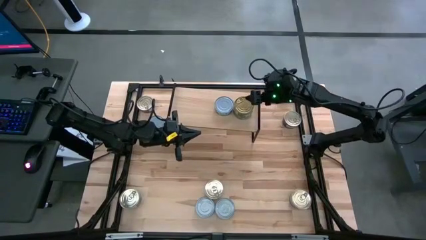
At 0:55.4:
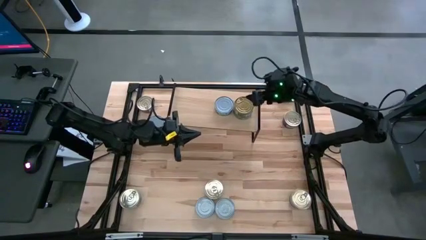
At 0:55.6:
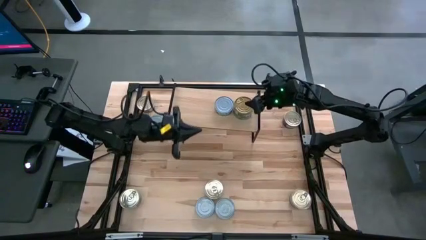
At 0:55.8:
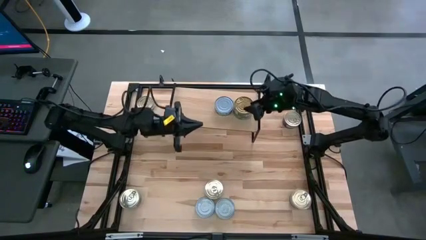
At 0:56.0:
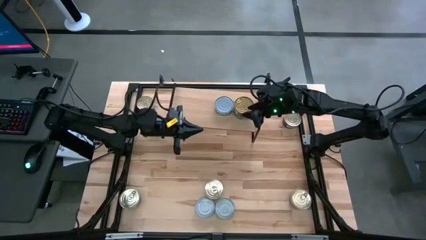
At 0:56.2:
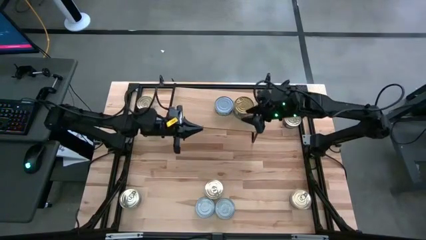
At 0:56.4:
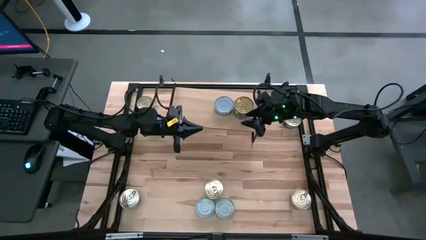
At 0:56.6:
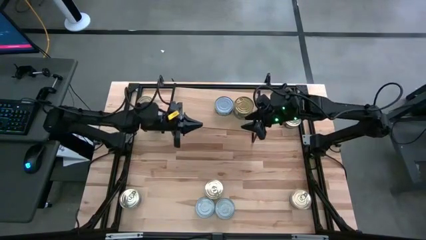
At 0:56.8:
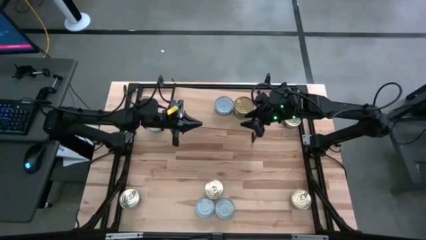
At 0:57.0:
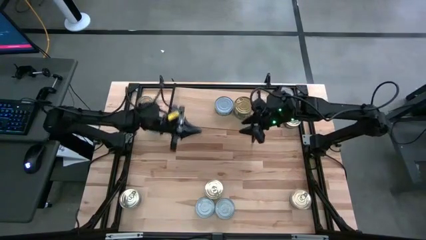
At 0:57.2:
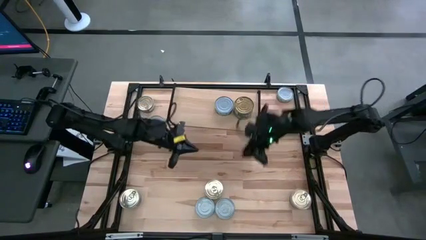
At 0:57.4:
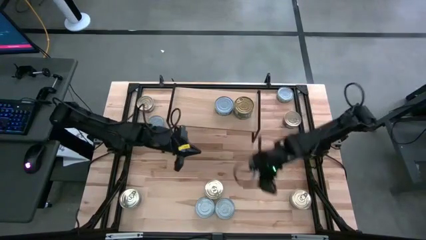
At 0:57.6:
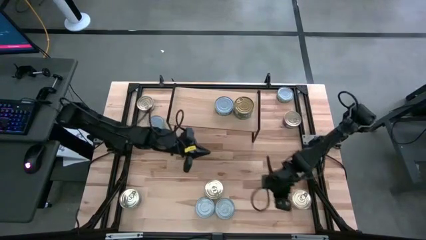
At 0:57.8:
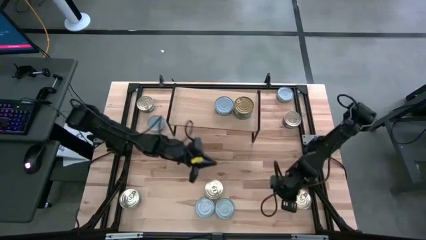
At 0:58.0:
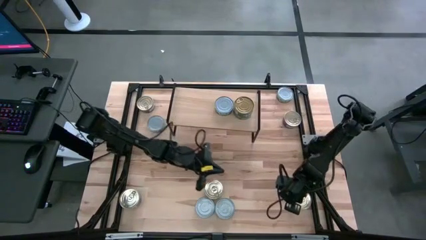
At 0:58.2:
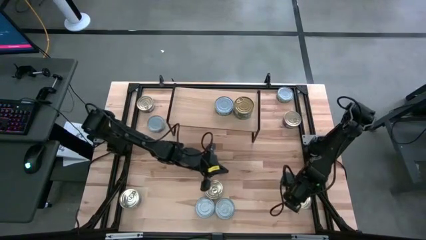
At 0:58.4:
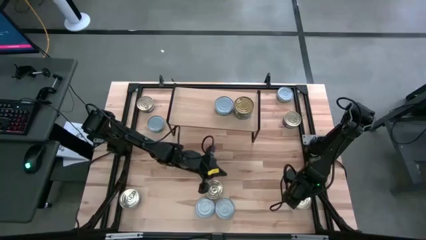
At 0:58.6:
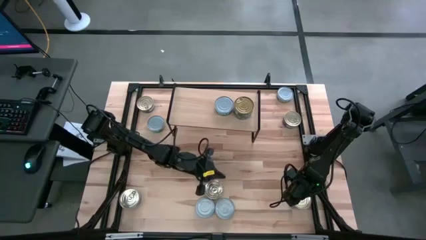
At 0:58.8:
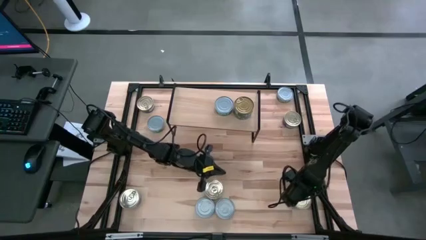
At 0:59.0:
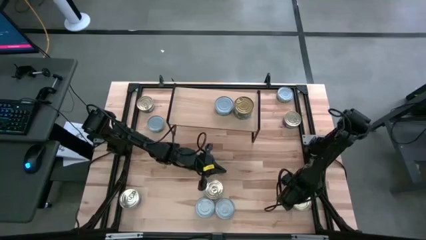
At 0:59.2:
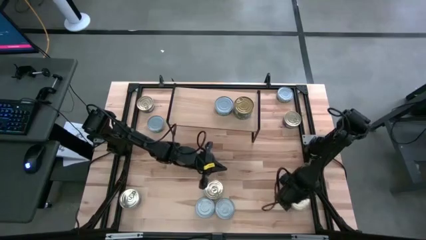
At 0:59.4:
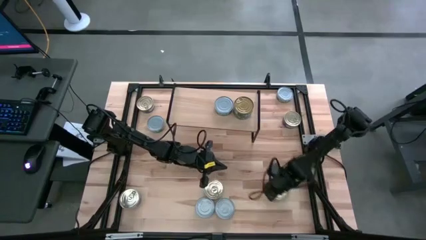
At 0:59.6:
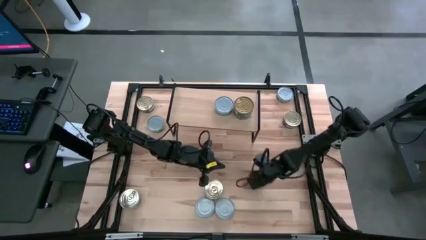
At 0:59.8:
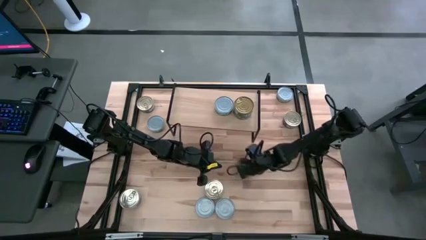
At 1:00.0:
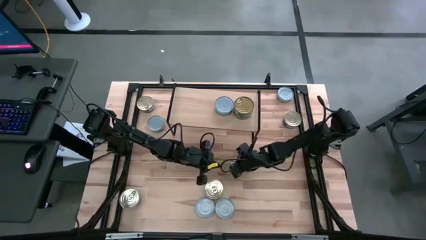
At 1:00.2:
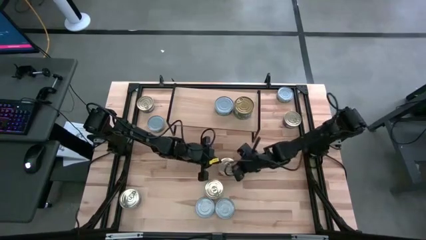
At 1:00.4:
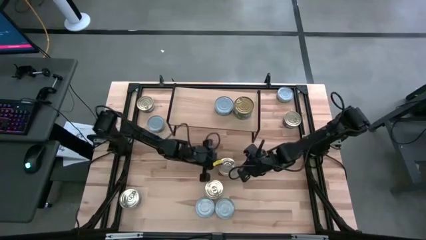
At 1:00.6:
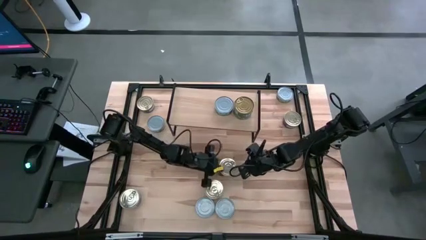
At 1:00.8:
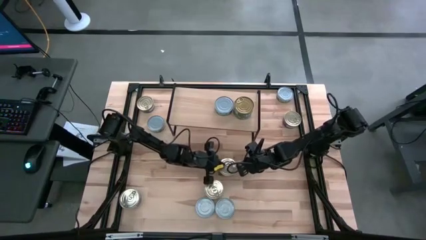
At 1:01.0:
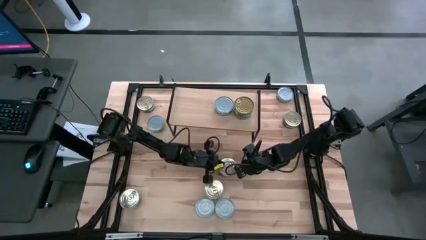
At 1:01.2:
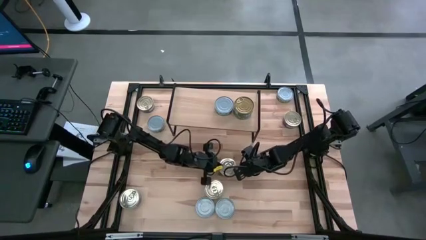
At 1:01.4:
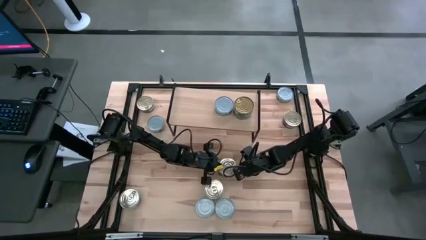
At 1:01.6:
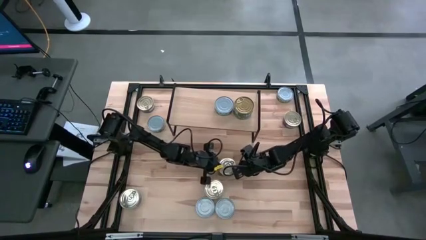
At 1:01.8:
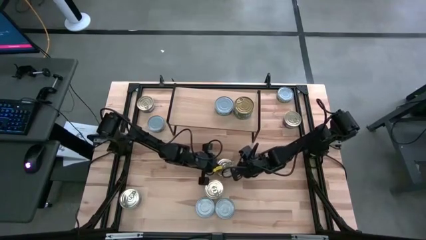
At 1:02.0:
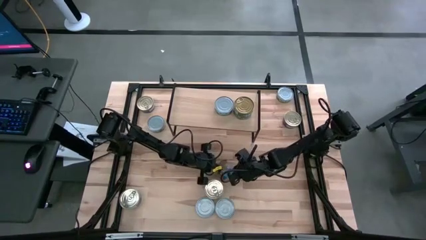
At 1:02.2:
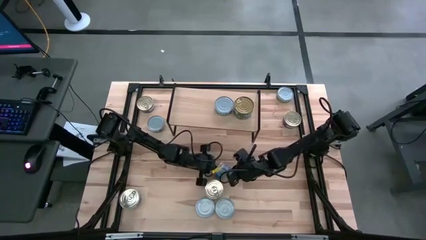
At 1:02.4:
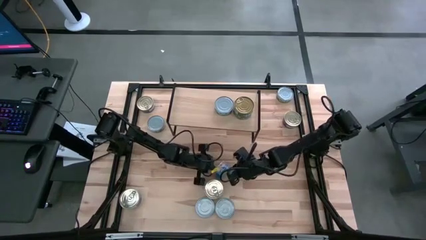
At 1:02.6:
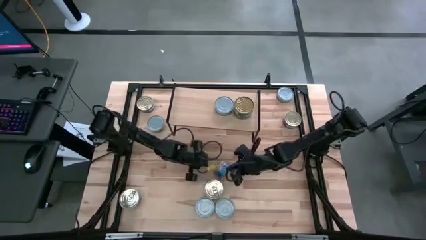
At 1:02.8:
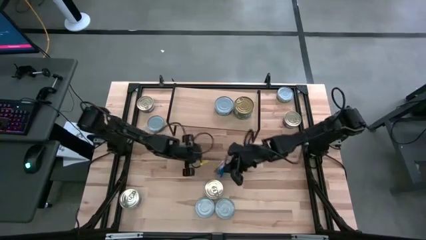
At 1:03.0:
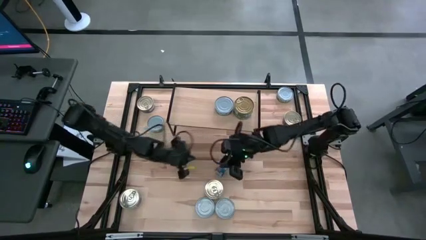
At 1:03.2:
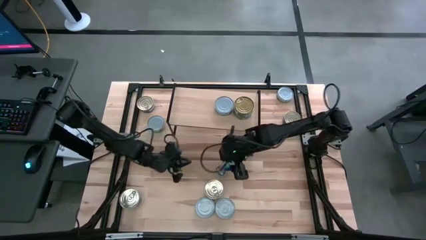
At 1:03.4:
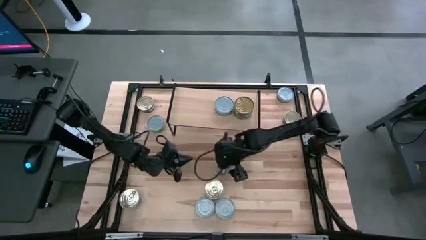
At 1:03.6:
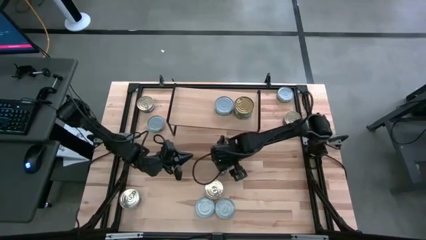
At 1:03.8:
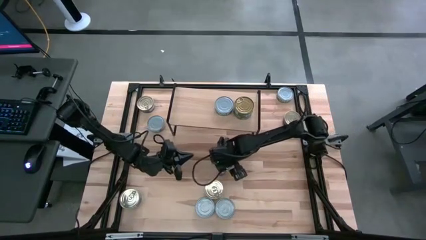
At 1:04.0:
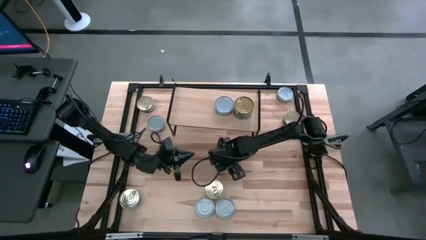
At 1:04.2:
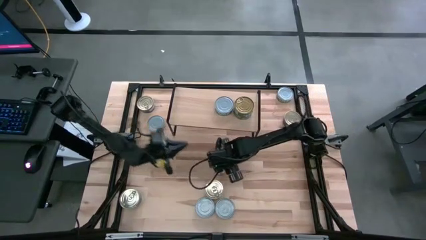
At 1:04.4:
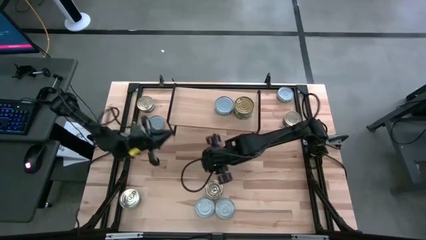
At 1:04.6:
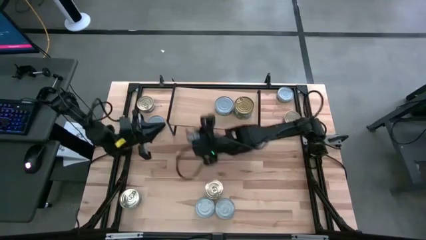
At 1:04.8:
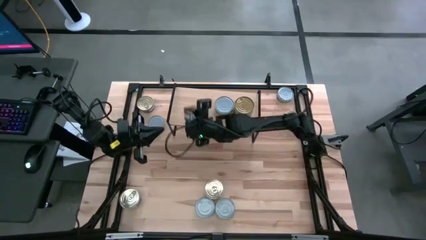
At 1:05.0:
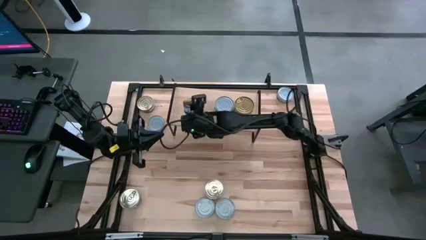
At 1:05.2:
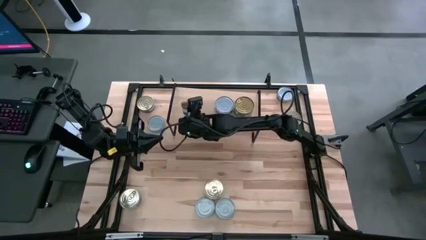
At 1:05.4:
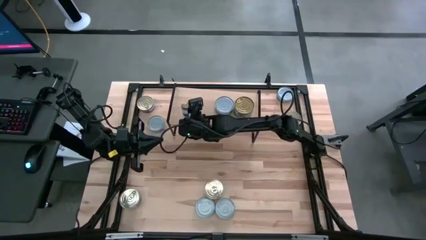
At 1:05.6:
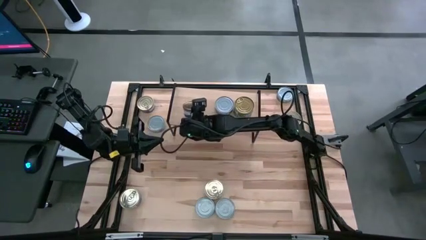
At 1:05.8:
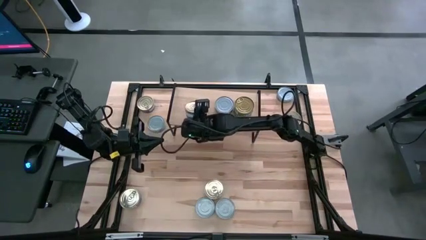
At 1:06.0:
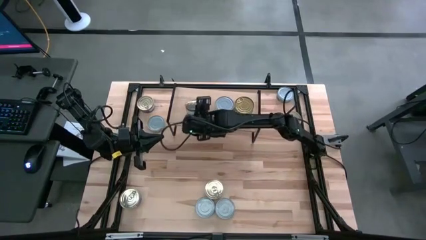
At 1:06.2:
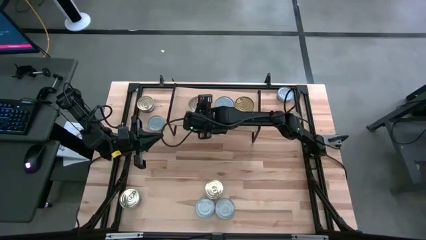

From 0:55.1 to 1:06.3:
Task: Stack canned seafood by type on shelf
Put the blue-pink tuna can on the shelf

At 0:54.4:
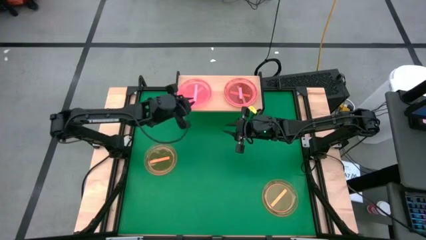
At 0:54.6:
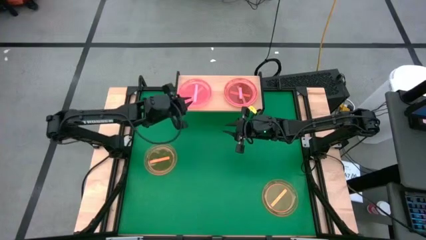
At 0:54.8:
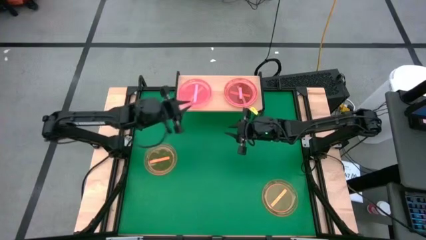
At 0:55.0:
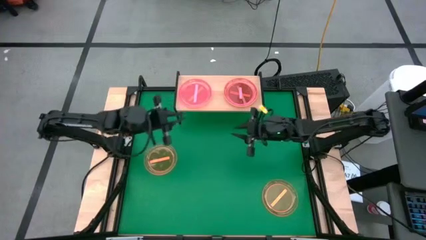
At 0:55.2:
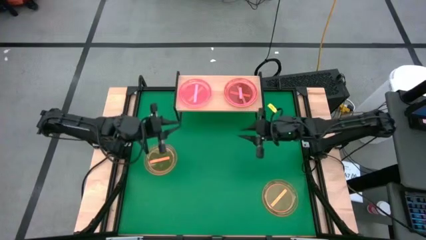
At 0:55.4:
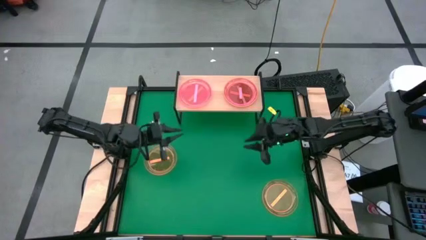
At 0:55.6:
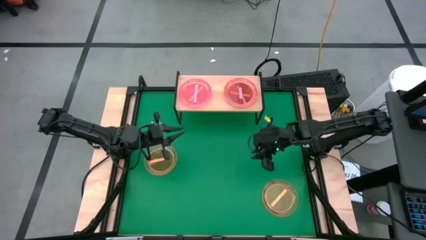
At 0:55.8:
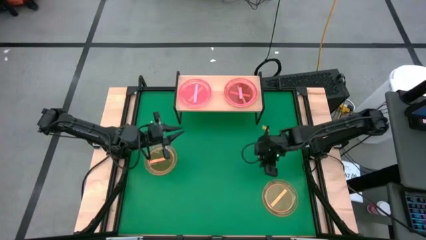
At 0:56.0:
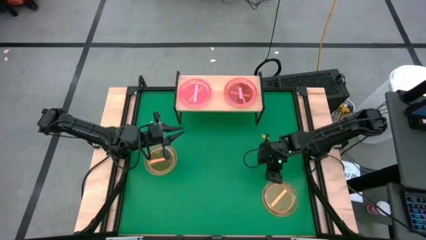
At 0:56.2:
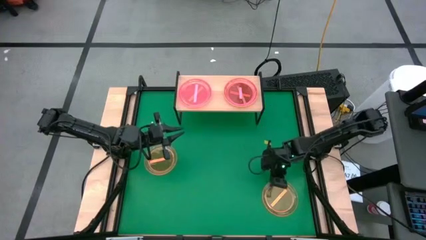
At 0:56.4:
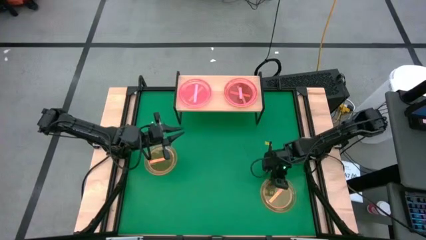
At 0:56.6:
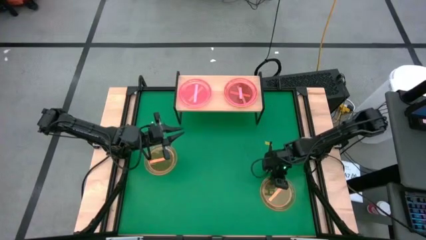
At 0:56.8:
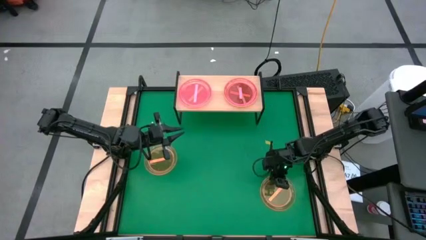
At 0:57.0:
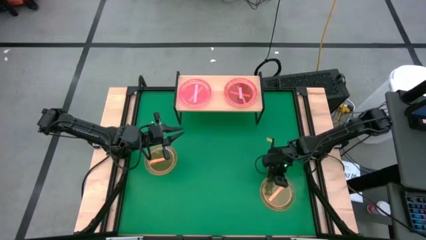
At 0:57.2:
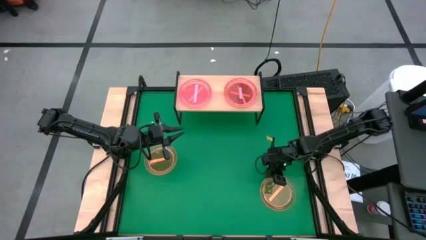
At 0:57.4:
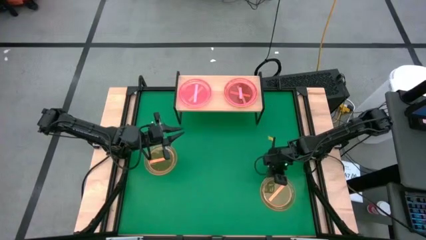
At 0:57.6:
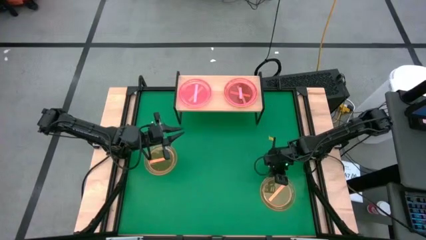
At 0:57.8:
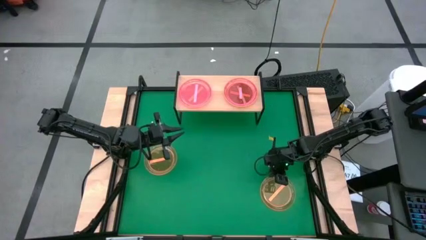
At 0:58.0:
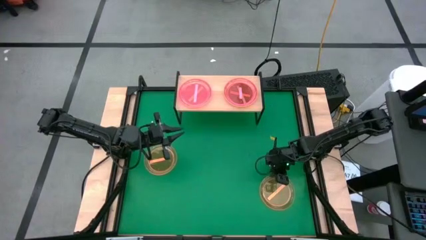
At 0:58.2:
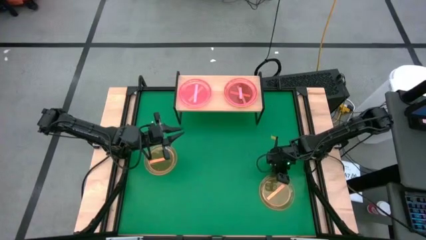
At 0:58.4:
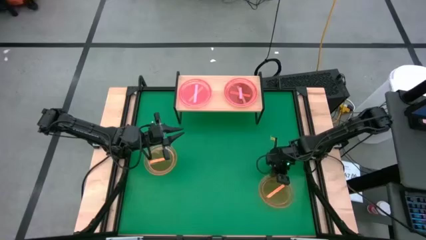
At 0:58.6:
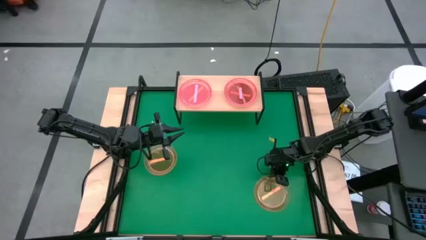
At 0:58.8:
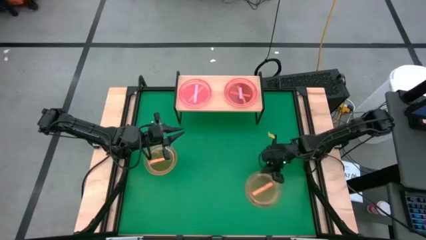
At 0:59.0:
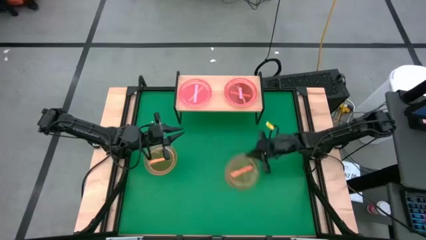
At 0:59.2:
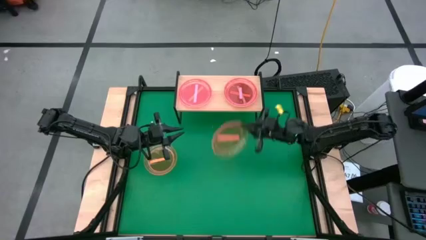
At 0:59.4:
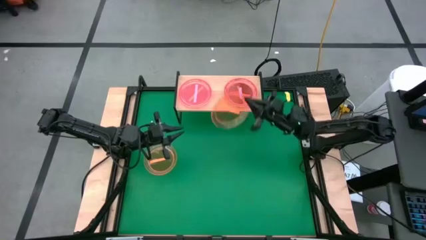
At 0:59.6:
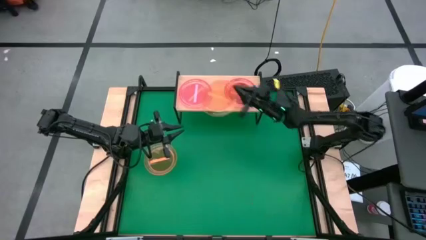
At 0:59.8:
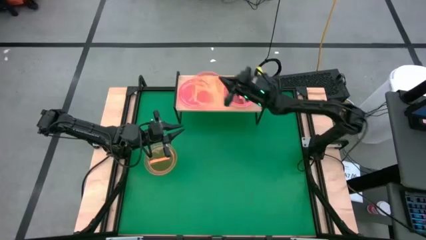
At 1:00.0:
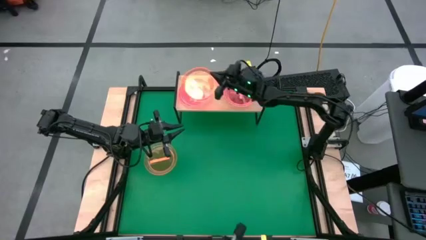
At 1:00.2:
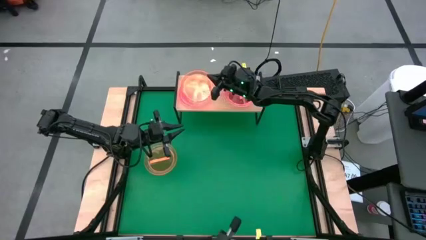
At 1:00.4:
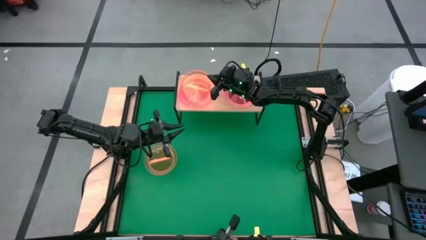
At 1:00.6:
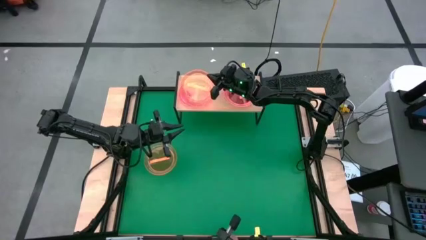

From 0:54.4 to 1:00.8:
Task: Place and stack plates onto a shelf
Stack the orange plate on top of the pink plate on the shelf
